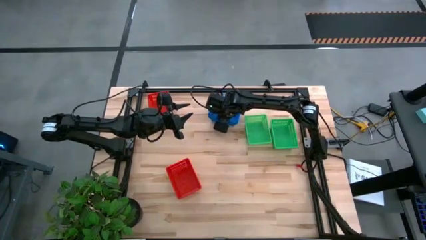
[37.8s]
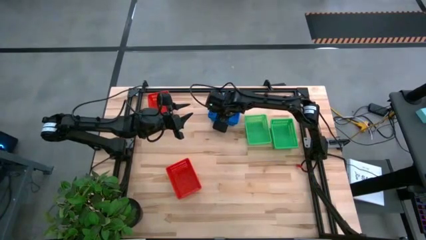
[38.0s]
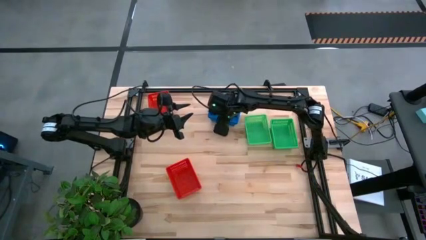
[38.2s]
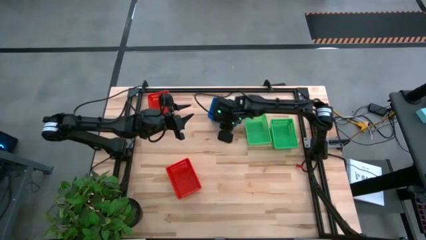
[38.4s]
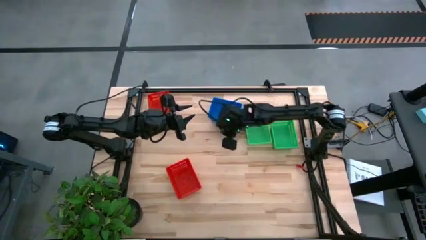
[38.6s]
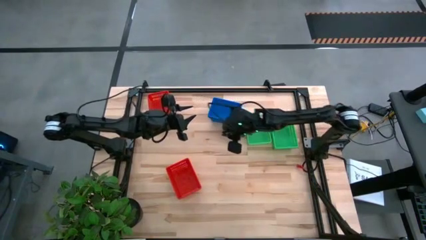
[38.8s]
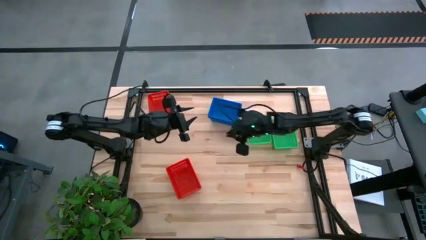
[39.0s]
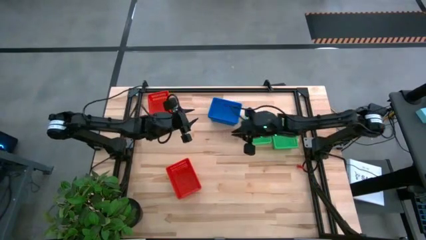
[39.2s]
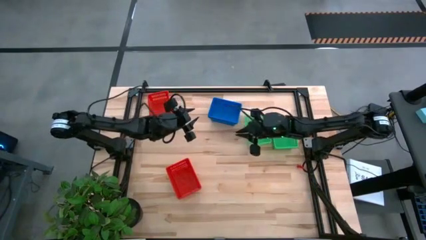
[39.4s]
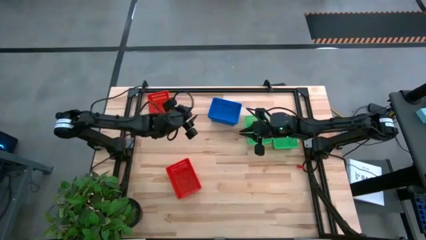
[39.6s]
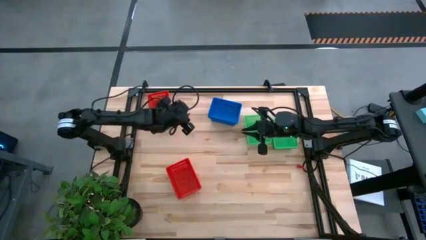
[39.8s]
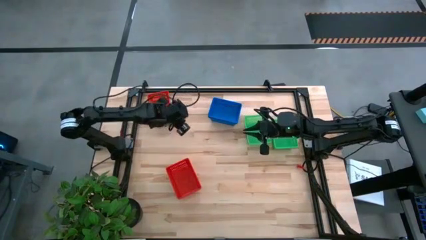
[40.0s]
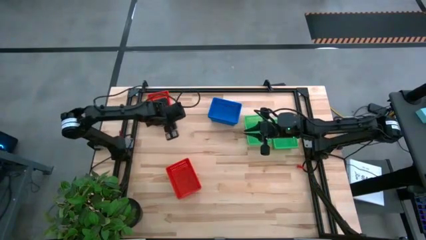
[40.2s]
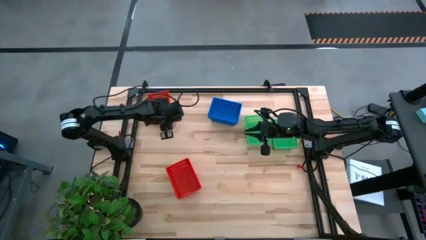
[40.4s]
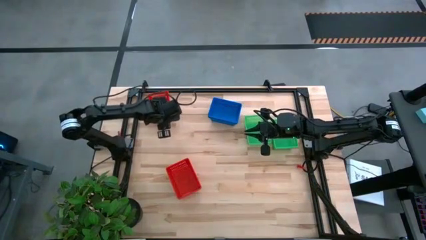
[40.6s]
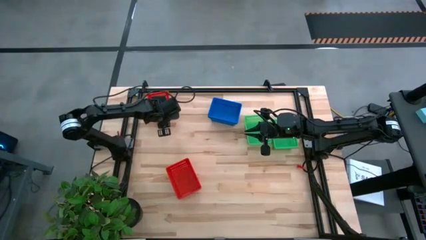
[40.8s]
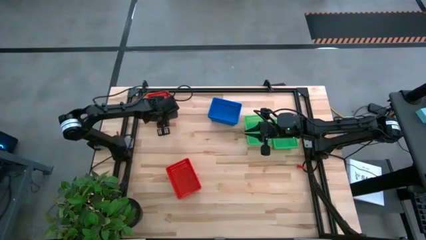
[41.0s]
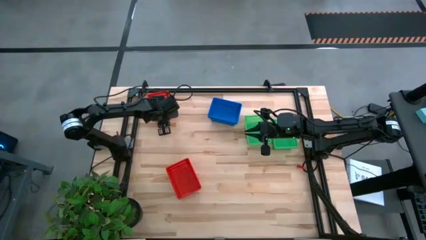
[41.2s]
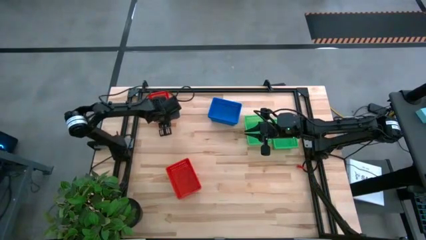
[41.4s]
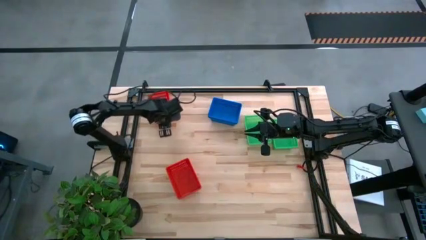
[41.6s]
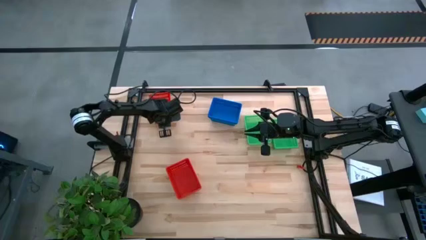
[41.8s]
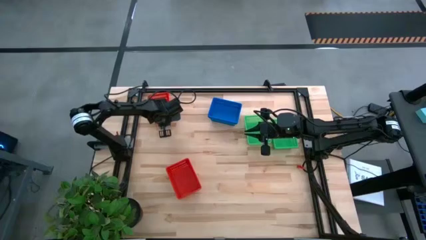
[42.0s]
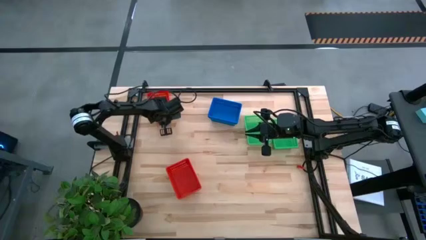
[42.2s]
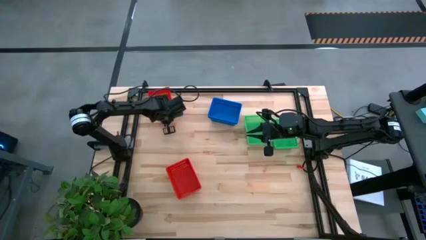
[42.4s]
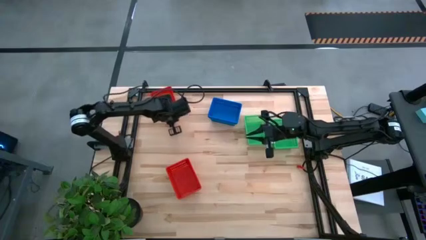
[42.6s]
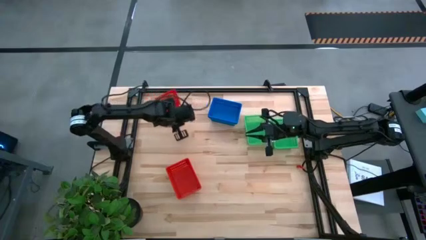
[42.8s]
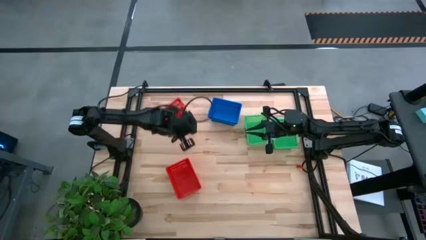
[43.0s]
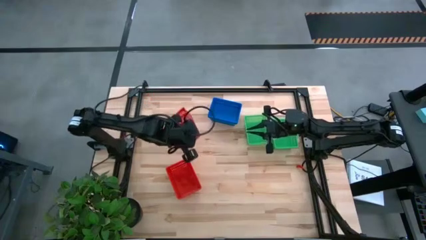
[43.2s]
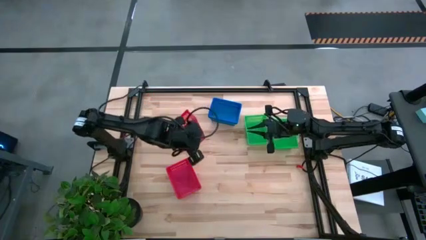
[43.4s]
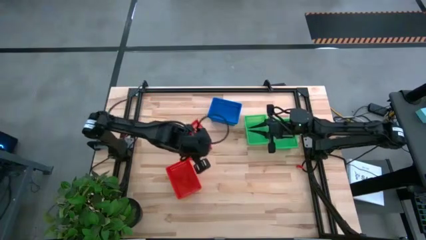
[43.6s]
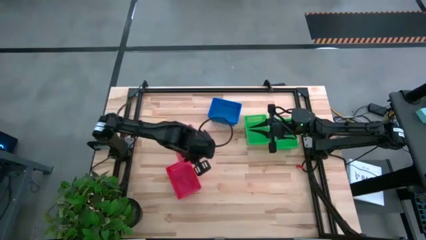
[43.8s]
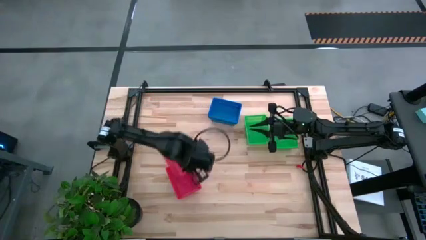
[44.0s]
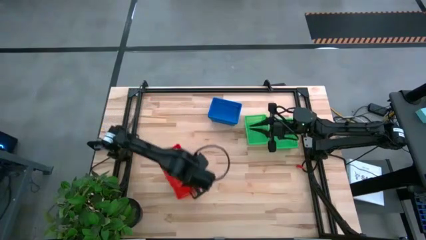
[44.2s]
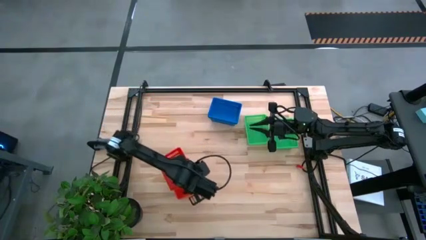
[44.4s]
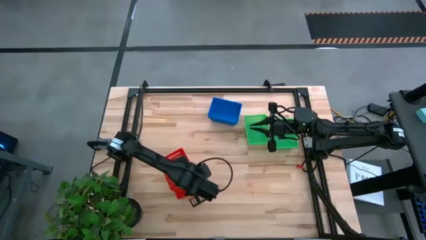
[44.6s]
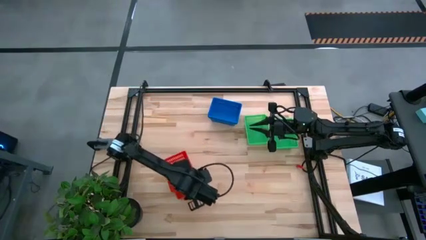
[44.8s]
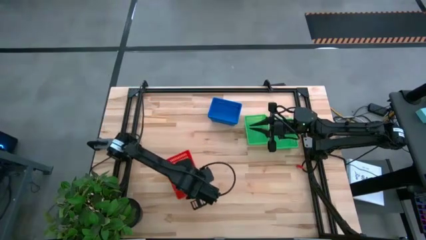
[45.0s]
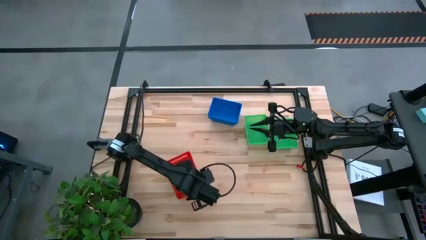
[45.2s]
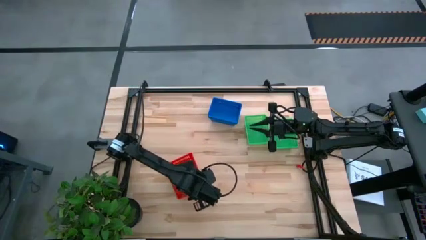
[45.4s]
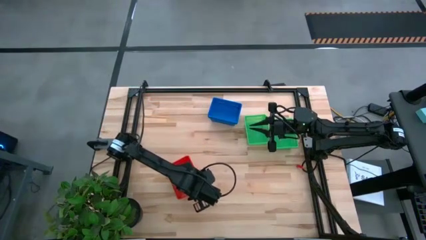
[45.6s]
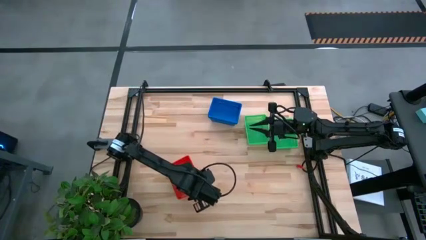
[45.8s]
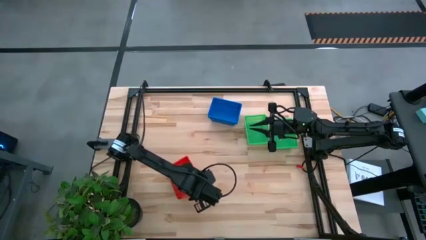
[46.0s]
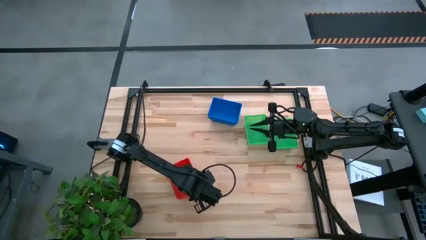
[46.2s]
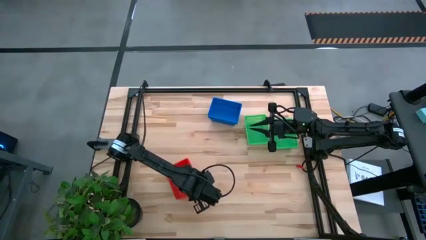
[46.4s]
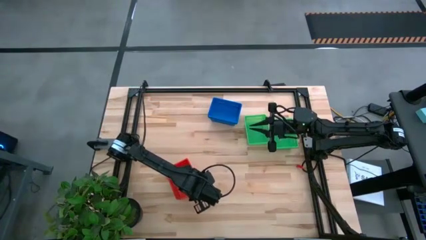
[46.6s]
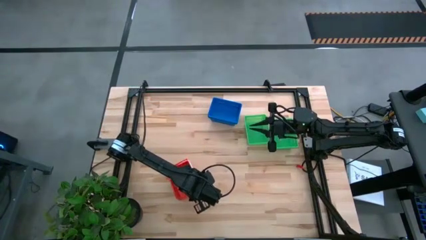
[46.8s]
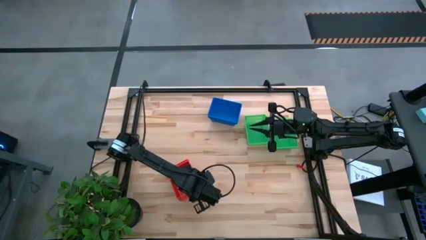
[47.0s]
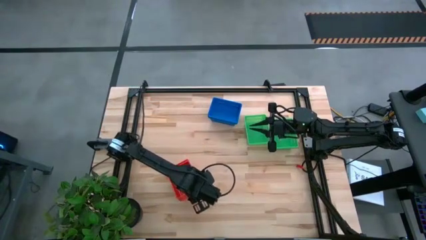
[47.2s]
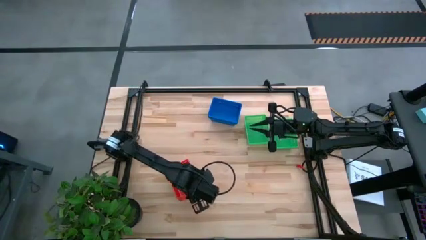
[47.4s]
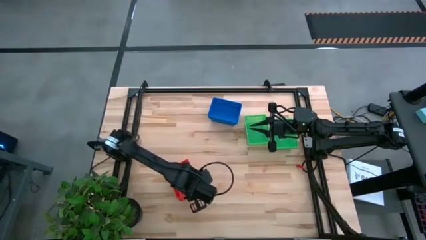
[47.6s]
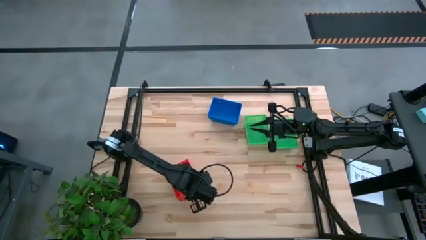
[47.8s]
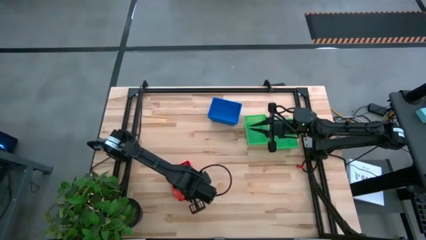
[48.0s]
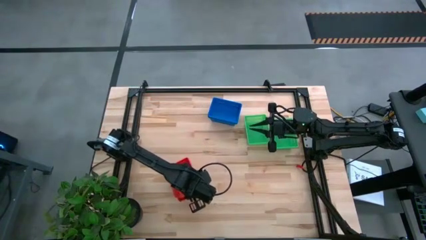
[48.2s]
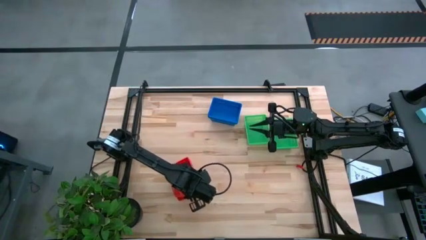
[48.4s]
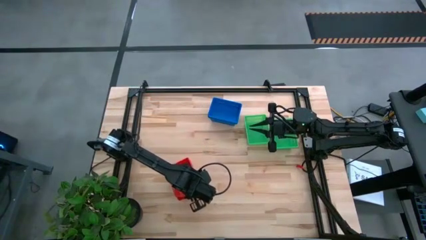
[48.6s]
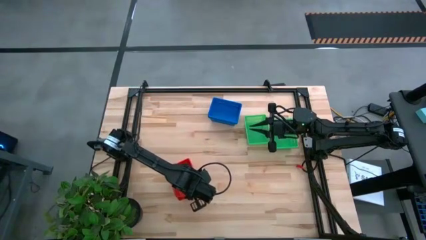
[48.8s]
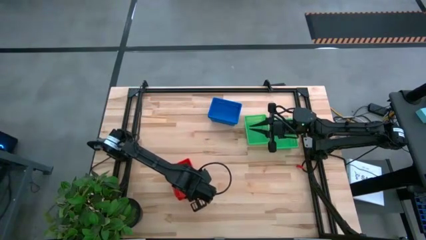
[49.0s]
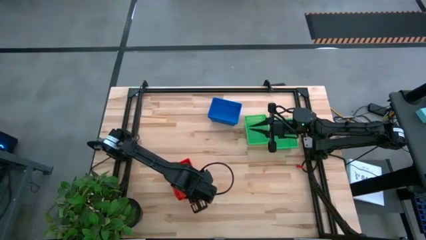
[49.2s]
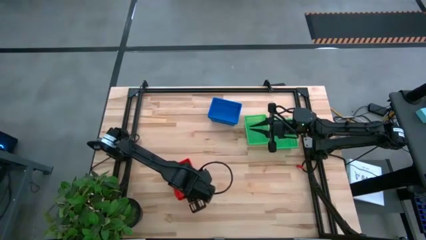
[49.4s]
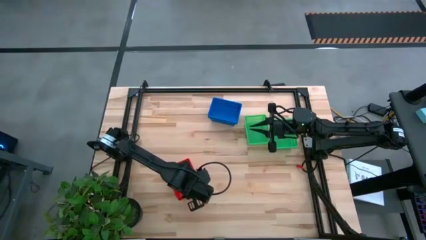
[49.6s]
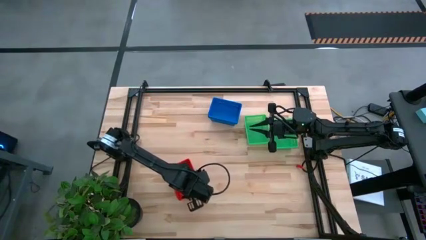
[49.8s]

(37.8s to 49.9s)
Stack the red bin on top of the bottom red bin

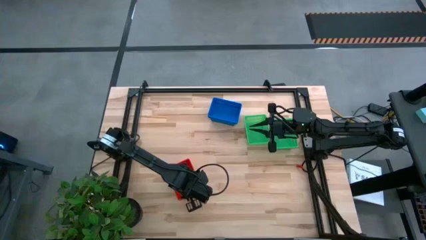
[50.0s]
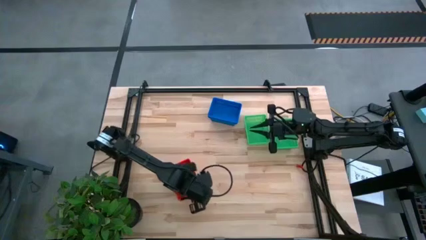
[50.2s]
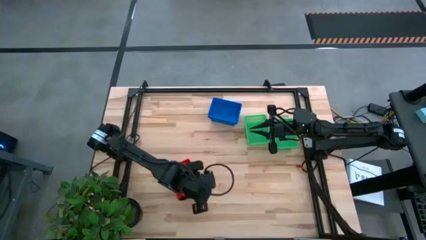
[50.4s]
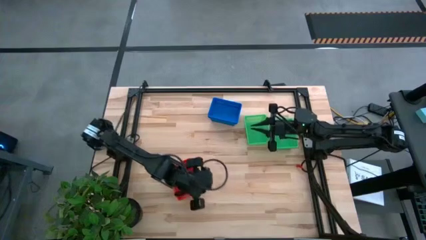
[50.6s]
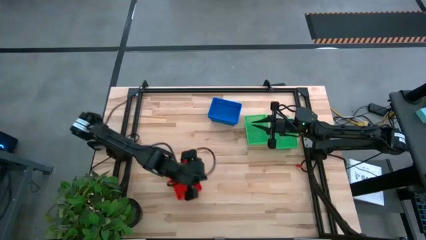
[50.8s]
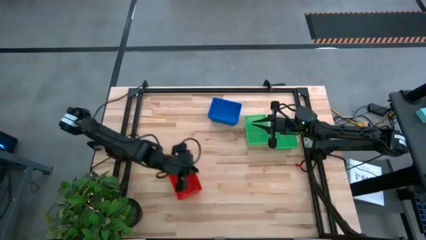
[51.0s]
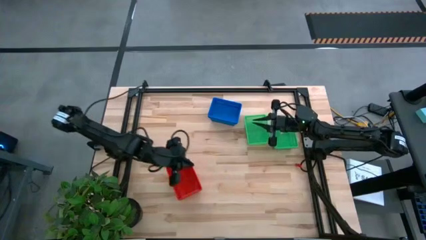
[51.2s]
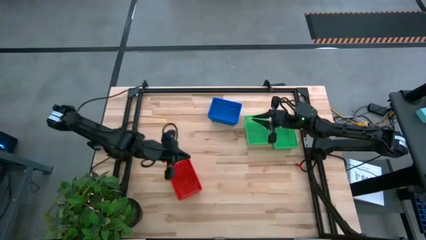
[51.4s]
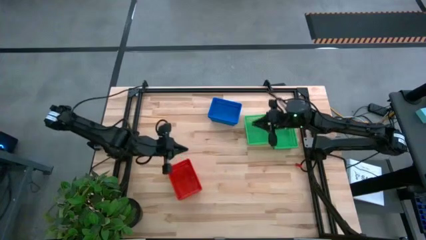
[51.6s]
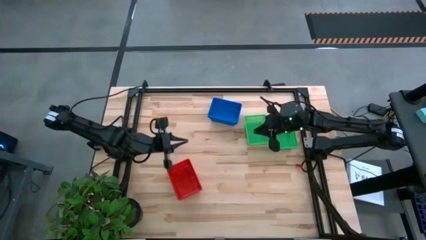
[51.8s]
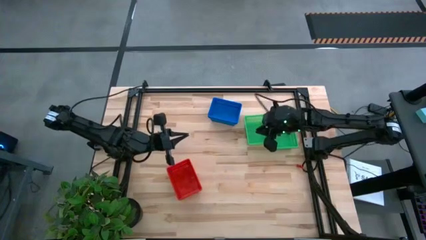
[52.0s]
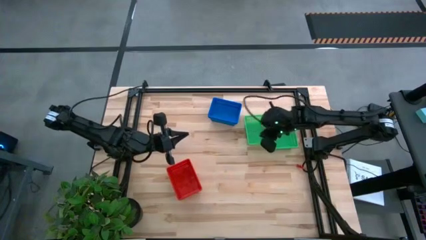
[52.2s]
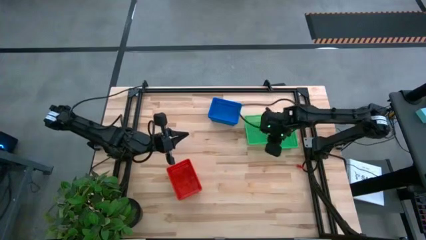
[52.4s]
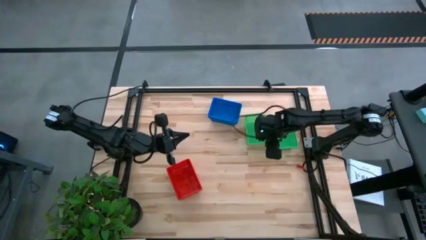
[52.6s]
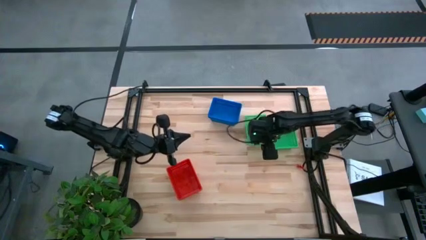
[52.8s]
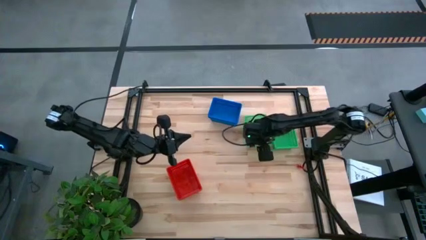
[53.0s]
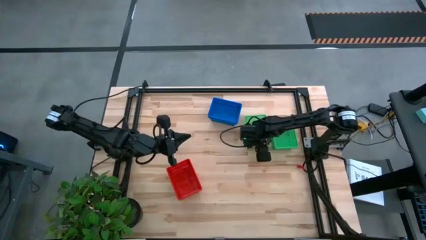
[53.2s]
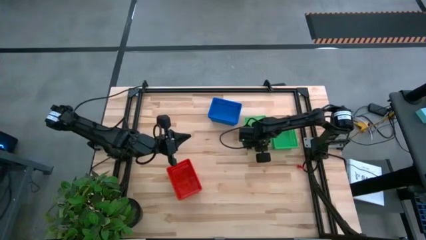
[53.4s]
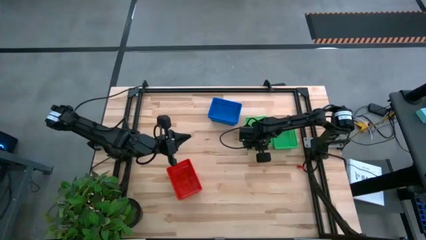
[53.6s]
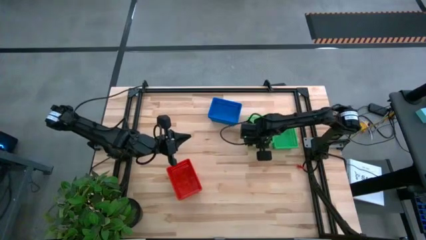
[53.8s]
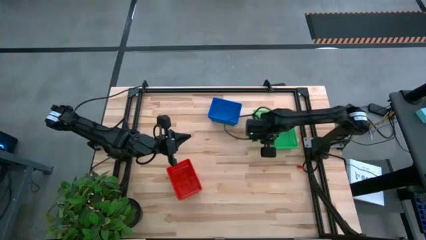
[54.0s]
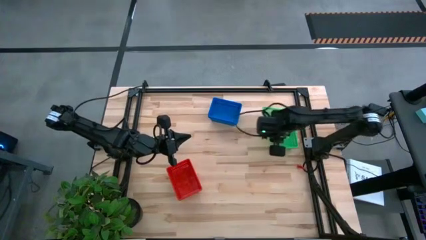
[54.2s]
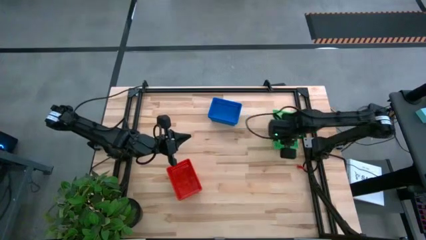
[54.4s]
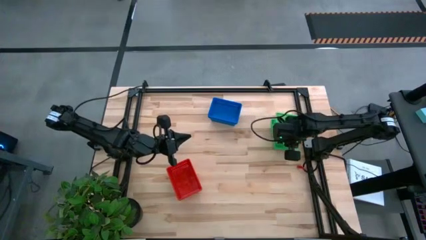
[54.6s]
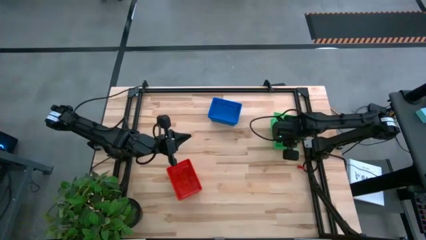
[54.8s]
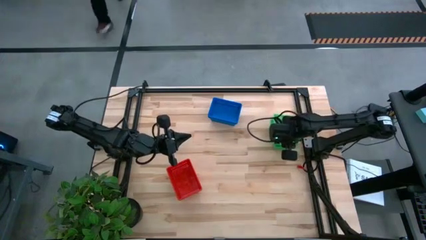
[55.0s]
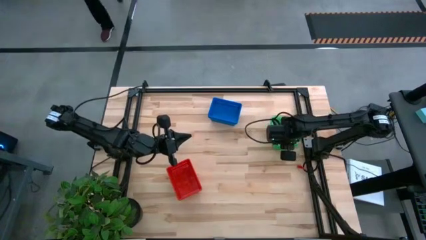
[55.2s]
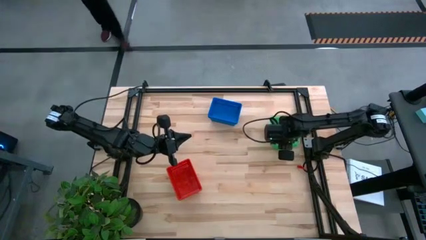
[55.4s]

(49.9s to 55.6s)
Stack the green bin on top of the right green bin
